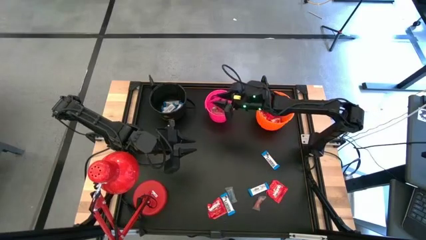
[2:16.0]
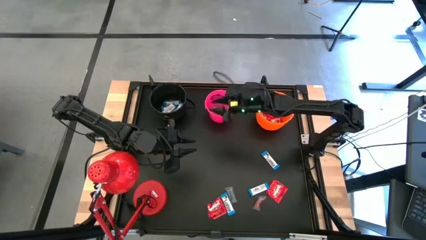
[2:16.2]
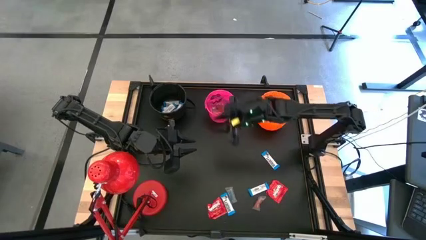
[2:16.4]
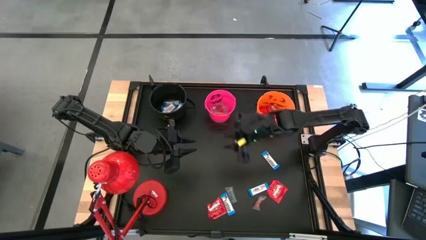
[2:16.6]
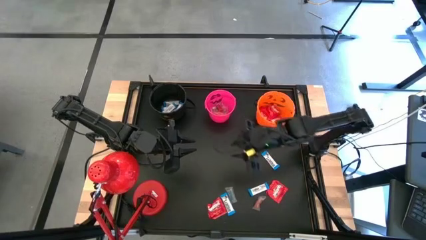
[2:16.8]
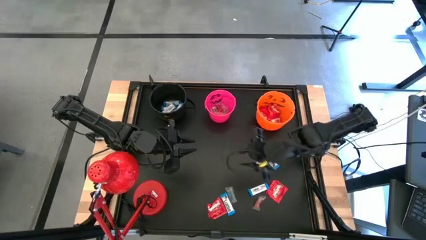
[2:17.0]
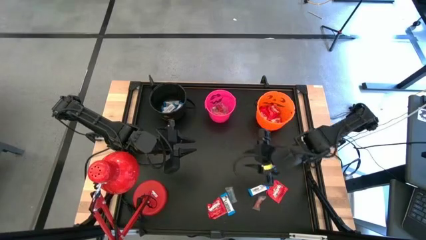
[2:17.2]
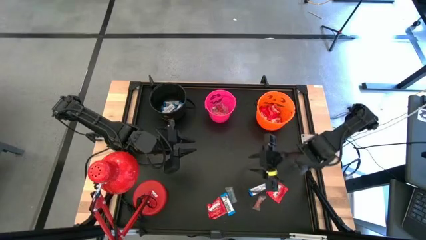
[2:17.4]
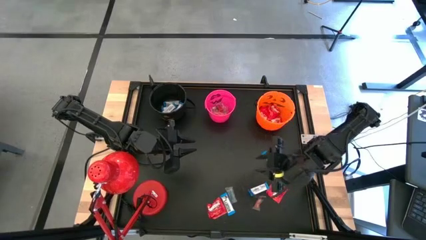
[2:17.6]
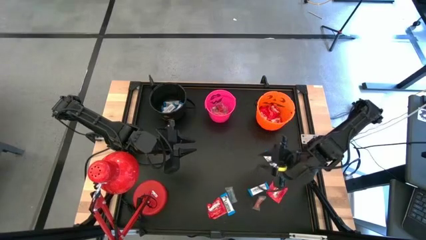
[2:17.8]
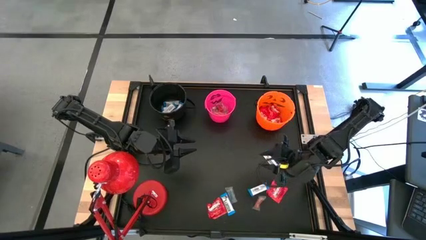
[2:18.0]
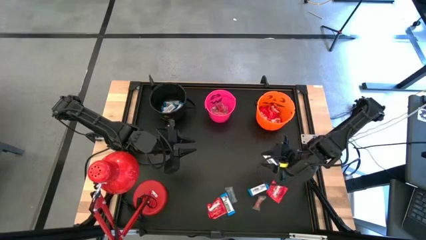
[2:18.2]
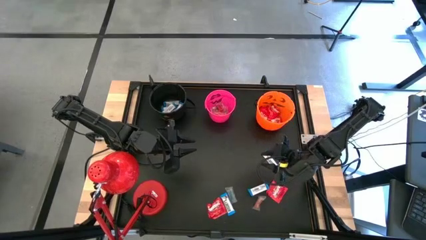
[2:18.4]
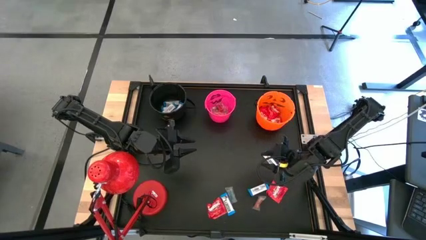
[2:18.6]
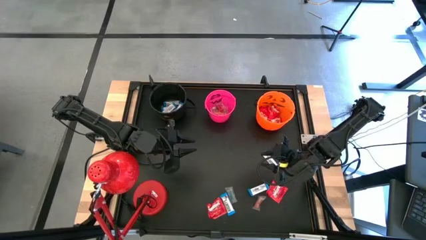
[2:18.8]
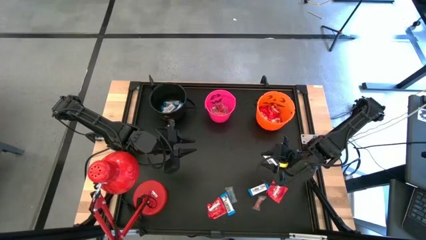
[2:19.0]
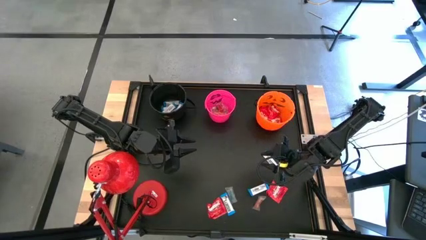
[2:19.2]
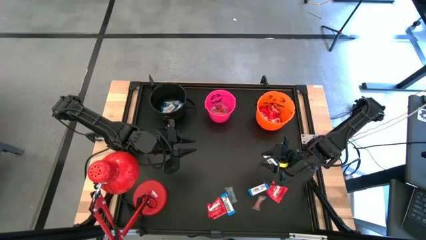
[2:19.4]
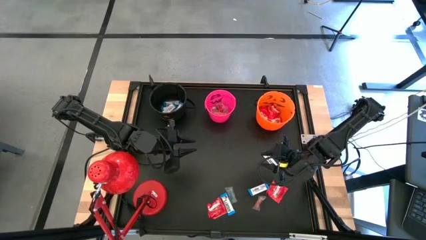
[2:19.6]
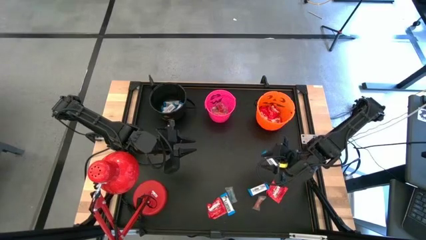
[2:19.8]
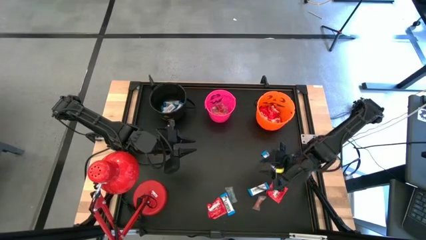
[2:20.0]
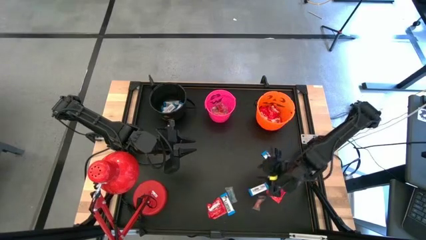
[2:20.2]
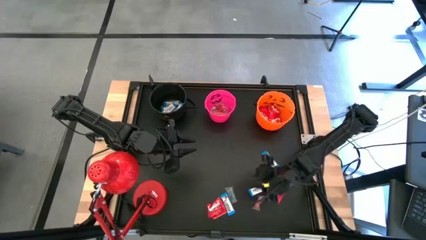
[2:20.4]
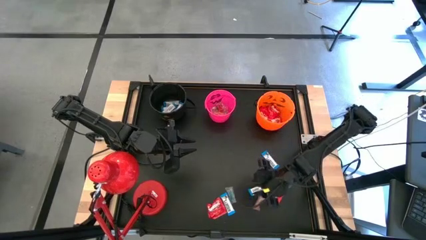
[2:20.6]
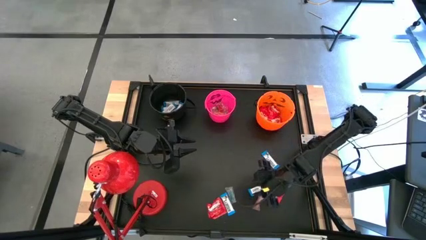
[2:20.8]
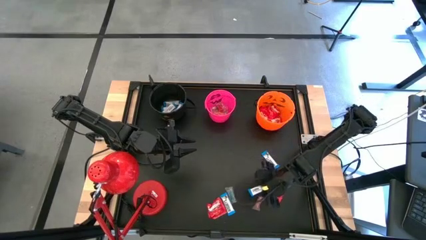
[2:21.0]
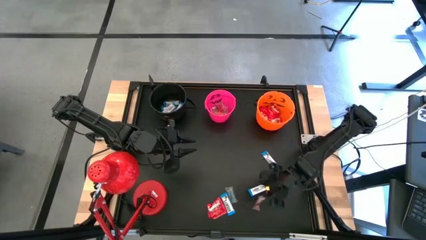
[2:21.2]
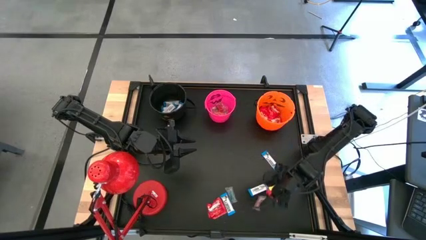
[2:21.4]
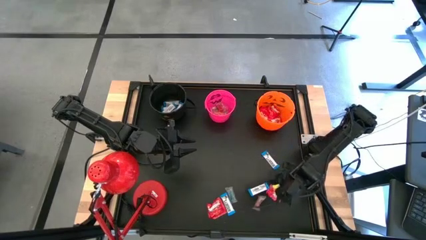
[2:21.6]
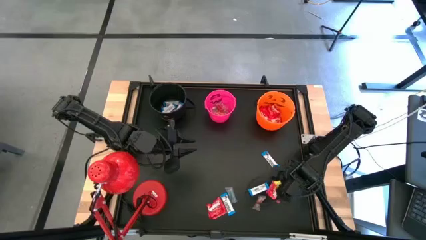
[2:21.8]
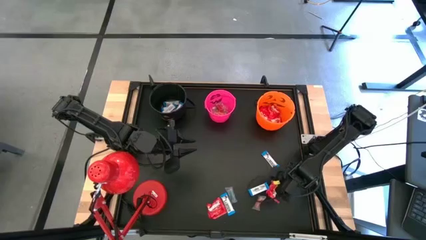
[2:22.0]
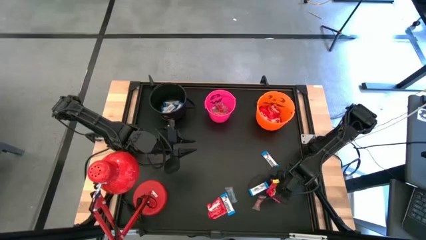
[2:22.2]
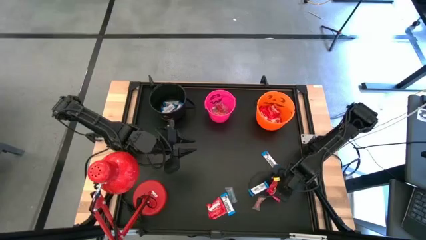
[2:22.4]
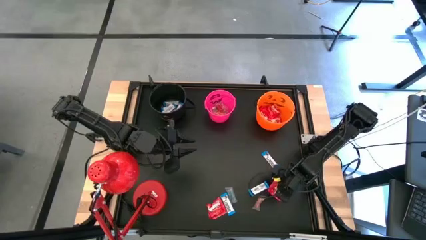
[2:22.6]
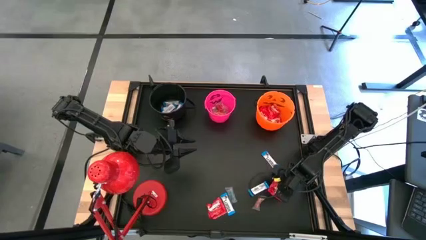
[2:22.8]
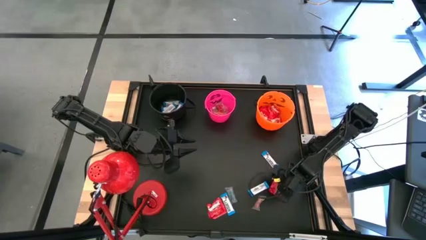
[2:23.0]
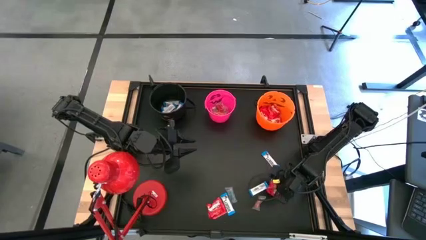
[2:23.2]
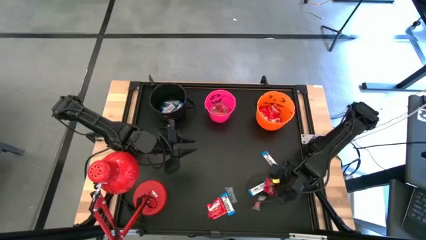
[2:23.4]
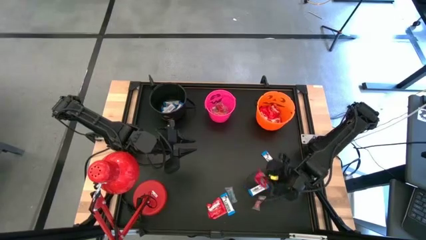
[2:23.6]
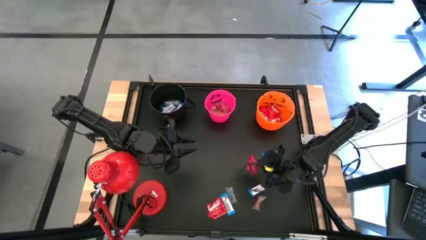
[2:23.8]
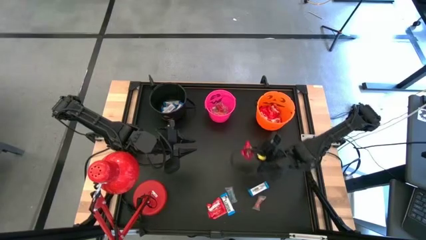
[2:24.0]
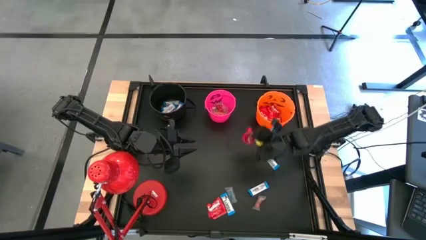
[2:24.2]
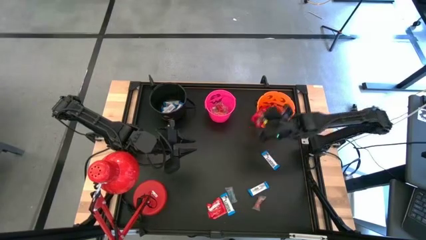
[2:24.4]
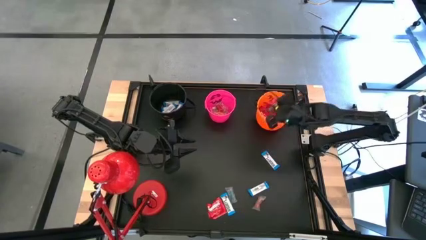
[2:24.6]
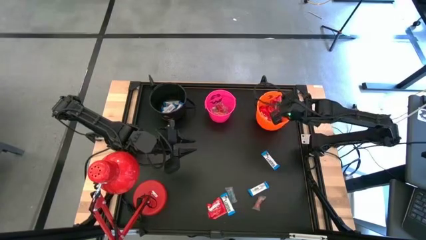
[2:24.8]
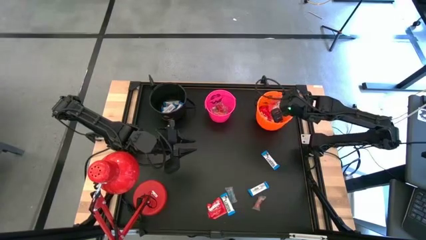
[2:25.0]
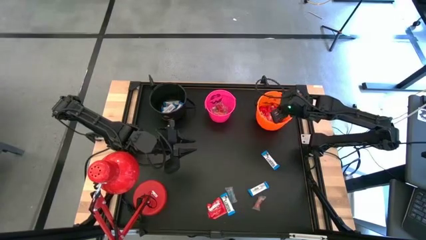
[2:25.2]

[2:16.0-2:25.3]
Task: Organize candy in baskets
Put the red candy into the orange bucket

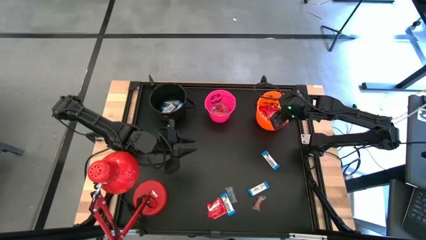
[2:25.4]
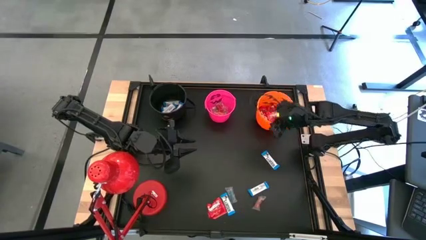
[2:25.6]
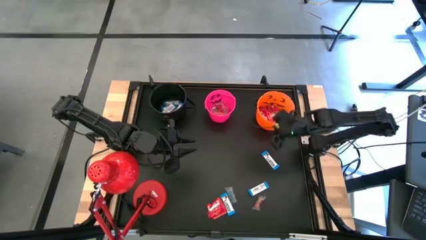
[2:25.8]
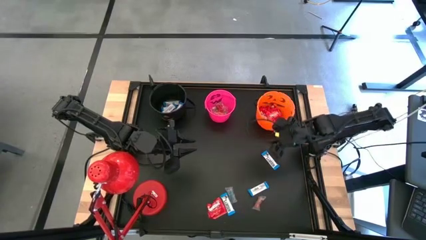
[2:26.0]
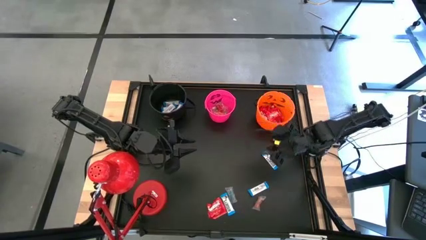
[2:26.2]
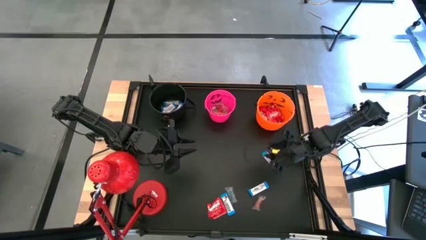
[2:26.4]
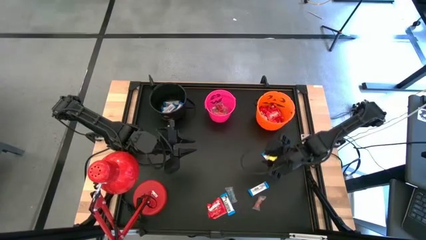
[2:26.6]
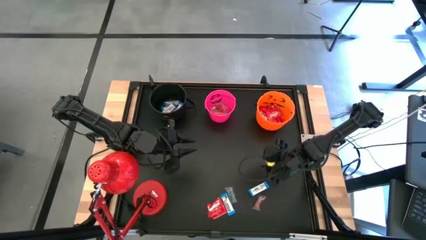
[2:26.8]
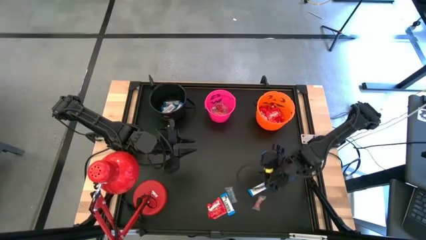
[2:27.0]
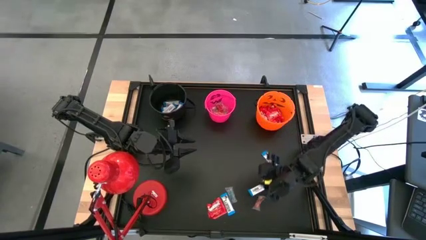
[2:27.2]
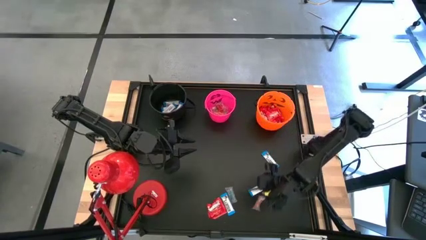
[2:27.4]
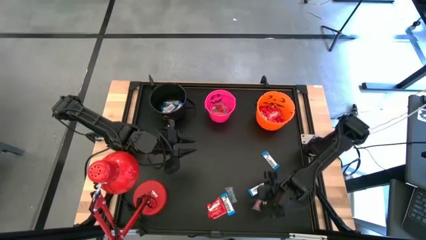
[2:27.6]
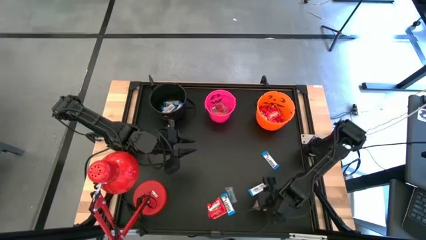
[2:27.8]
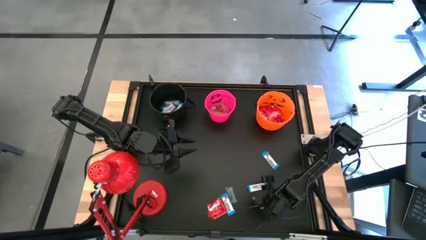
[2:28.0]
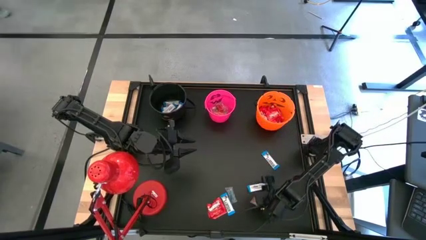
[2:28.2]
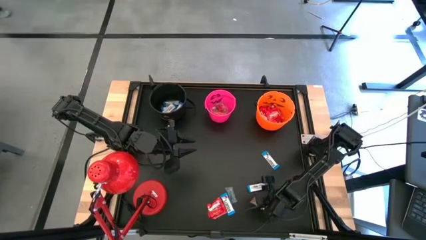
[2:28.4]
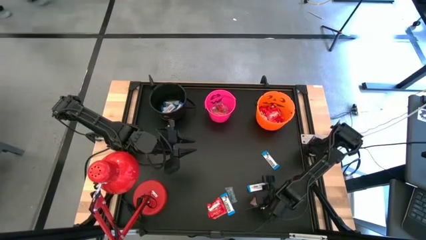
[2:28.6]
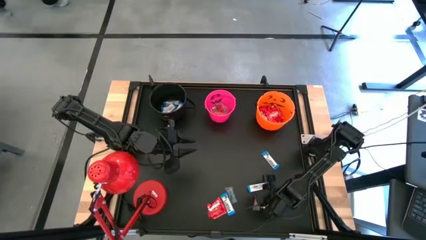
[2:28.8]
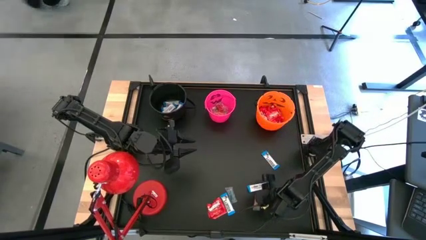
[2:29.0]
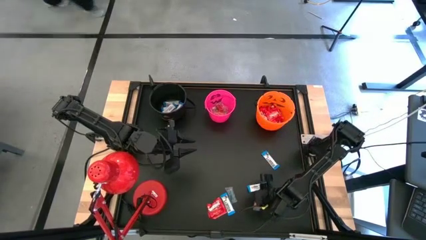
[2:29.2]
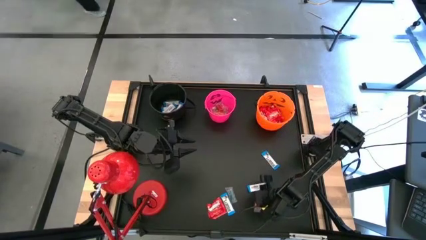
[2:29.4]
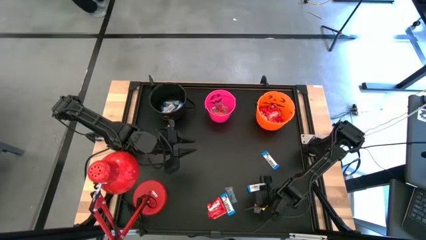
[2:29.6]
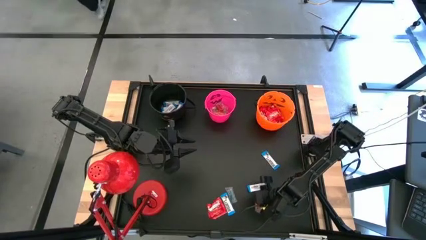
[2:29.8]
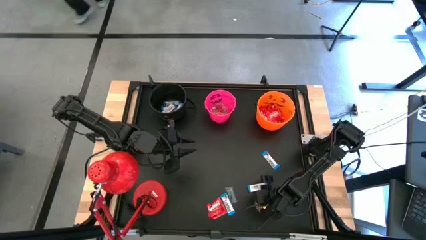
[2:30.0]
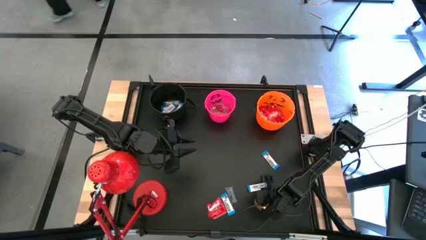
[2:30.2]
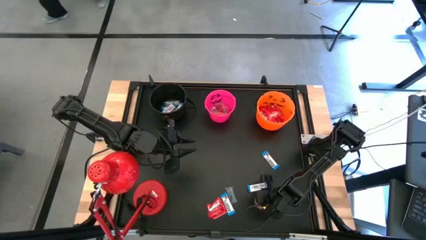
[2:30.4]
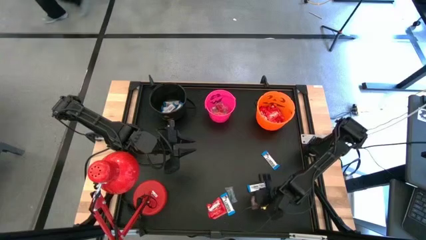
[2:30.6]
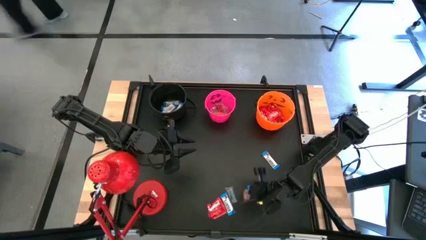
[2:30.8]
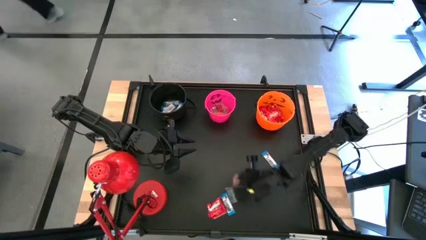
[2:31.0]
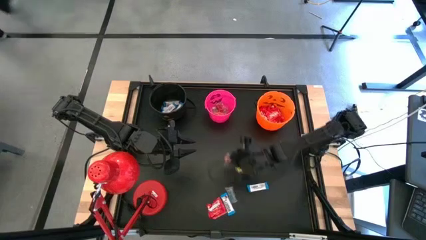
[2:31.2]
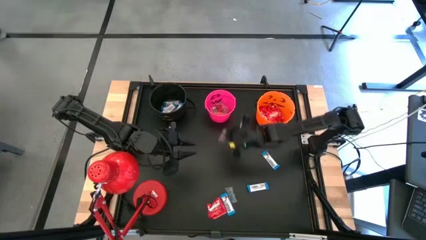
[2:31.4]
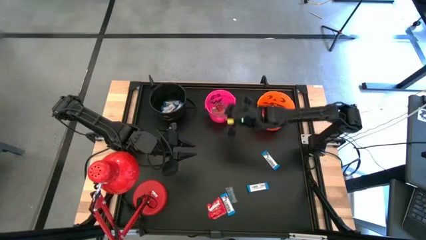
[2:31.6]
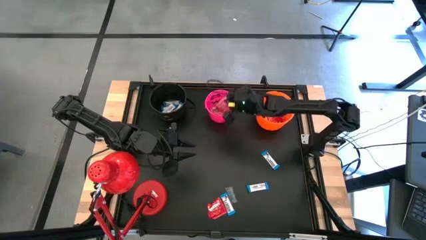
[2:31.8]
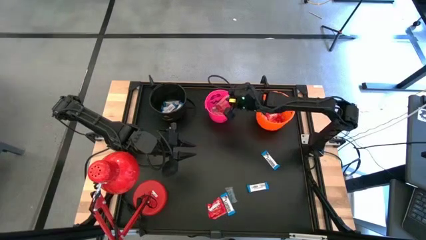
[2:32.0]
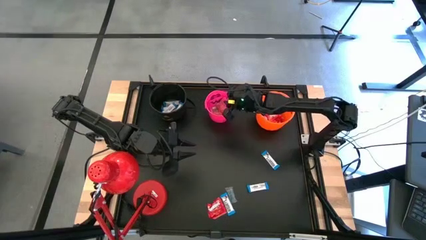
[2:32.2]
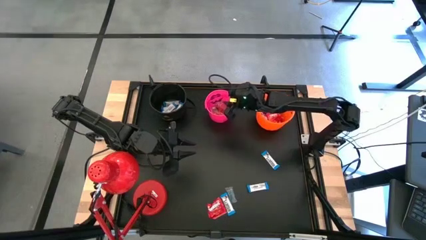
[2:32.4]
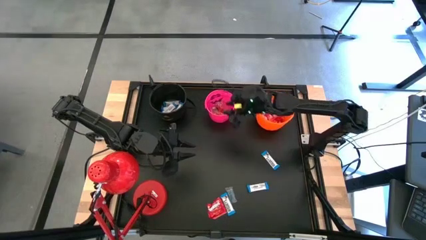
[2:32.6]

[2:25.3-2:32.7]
Put the transparent candy into the pink bucket
